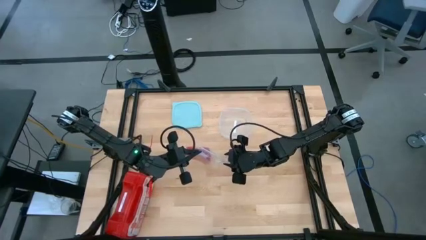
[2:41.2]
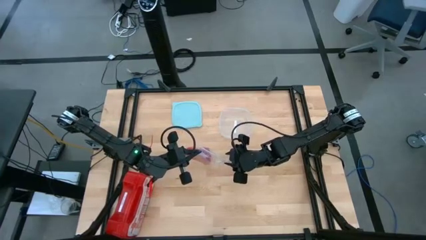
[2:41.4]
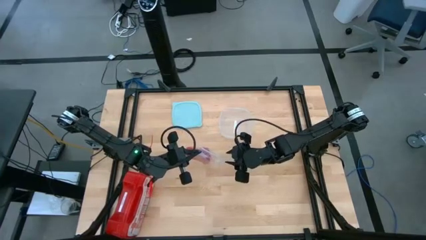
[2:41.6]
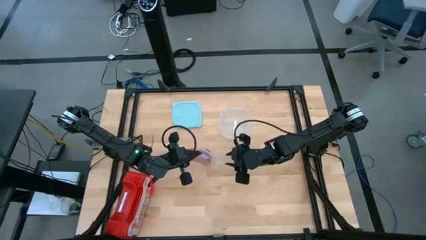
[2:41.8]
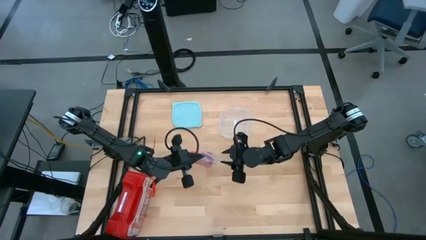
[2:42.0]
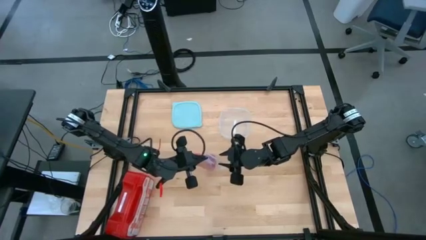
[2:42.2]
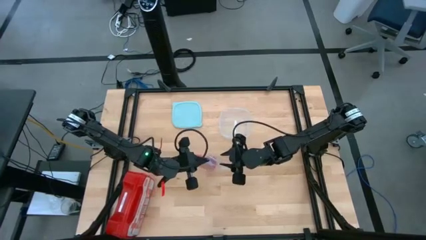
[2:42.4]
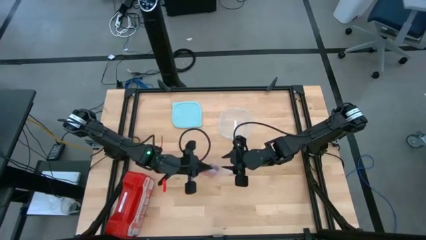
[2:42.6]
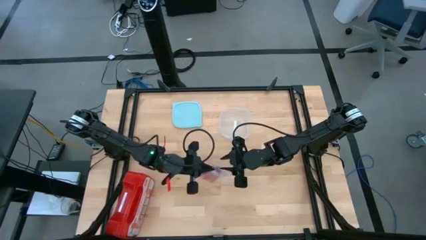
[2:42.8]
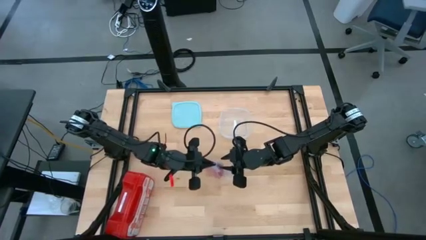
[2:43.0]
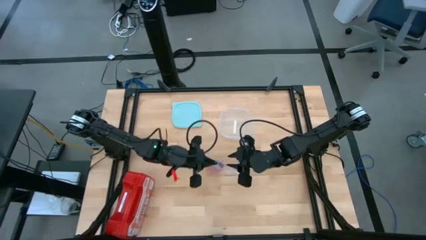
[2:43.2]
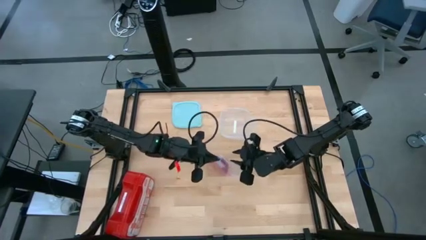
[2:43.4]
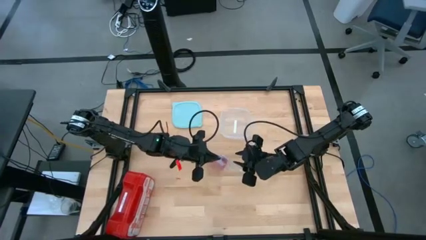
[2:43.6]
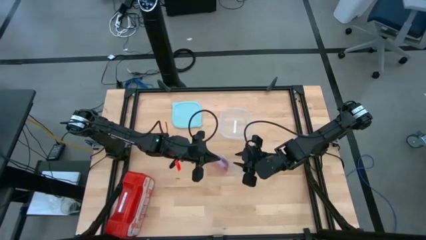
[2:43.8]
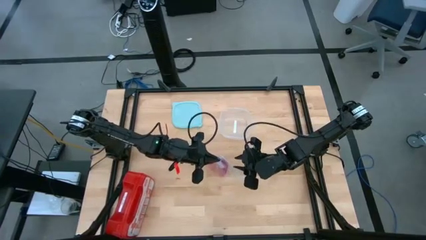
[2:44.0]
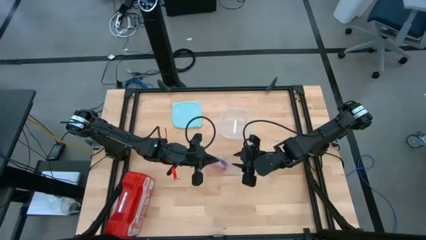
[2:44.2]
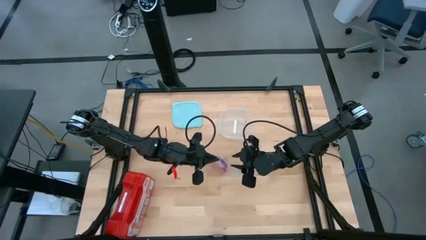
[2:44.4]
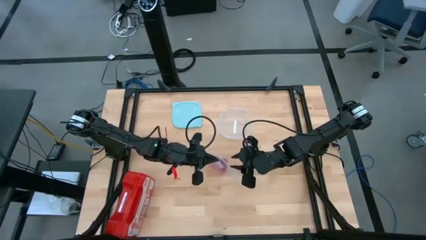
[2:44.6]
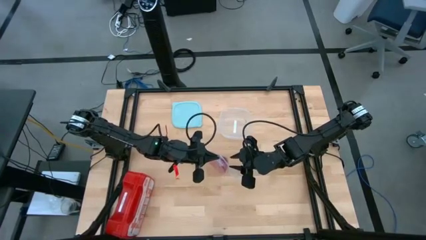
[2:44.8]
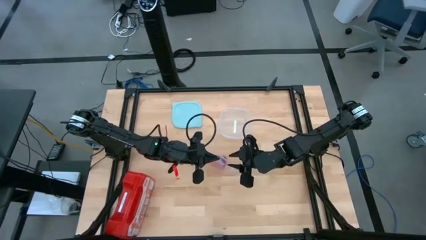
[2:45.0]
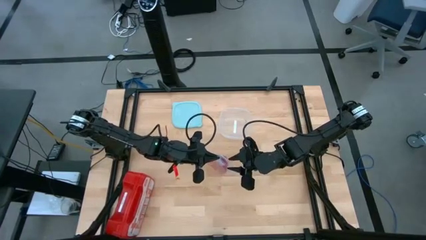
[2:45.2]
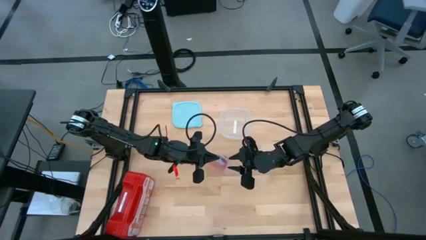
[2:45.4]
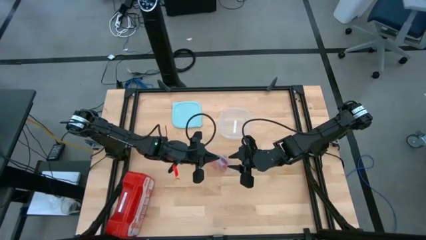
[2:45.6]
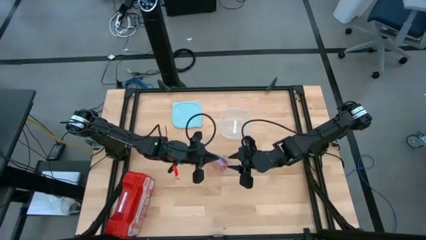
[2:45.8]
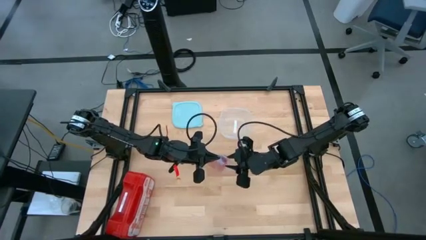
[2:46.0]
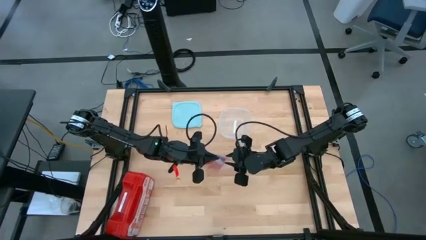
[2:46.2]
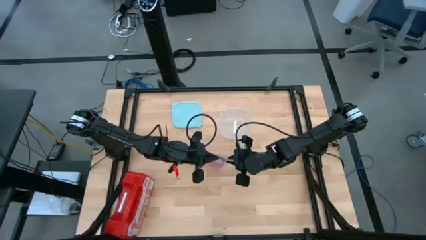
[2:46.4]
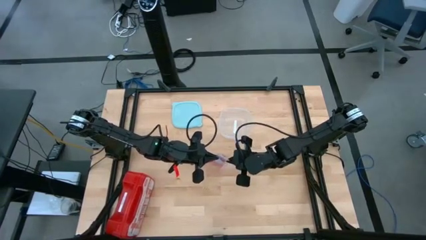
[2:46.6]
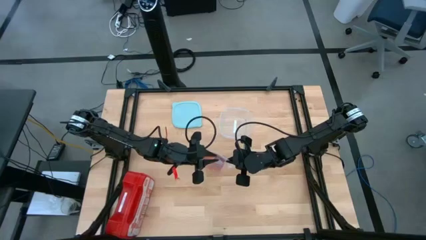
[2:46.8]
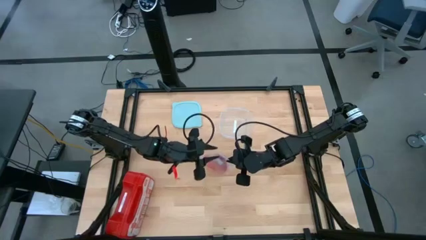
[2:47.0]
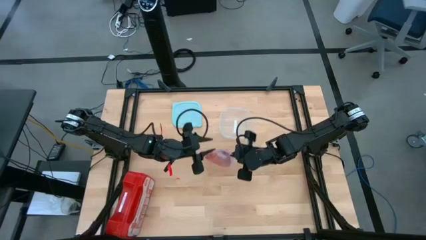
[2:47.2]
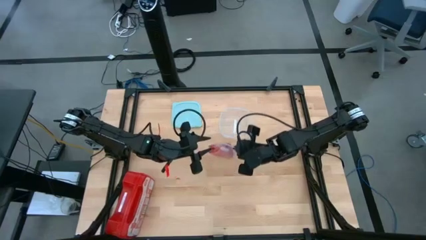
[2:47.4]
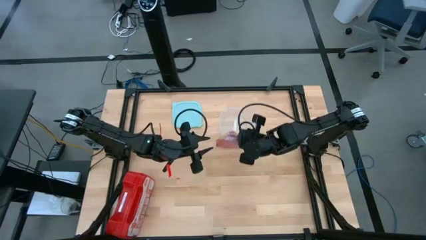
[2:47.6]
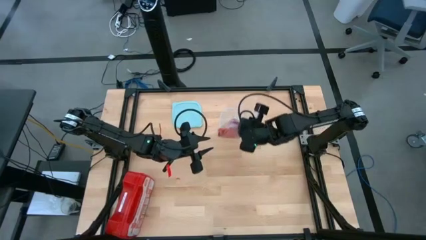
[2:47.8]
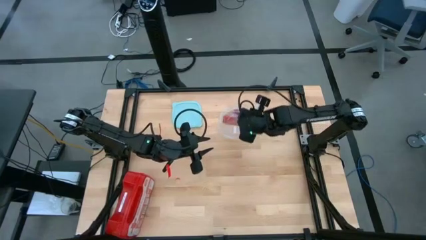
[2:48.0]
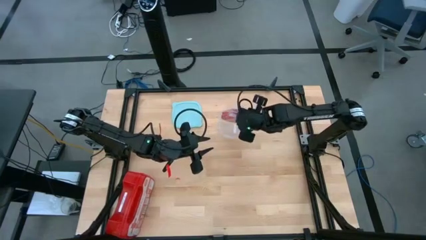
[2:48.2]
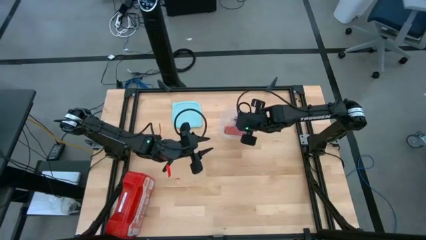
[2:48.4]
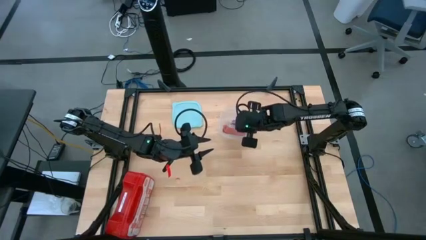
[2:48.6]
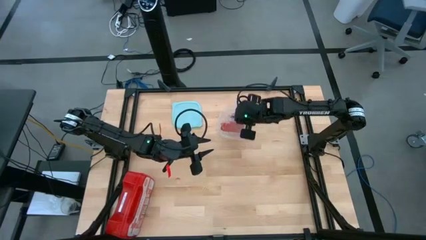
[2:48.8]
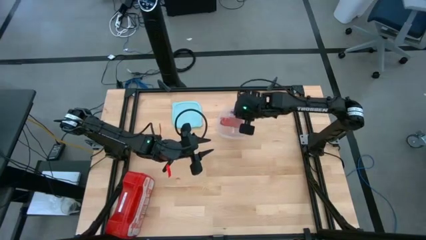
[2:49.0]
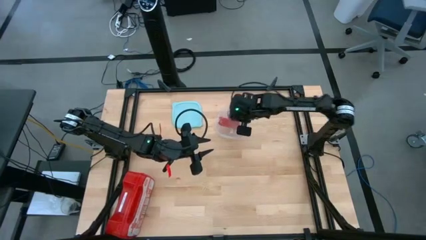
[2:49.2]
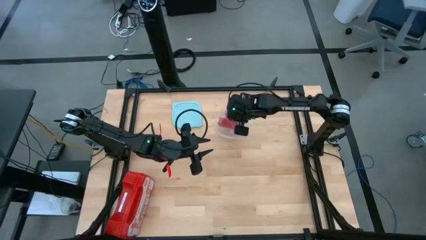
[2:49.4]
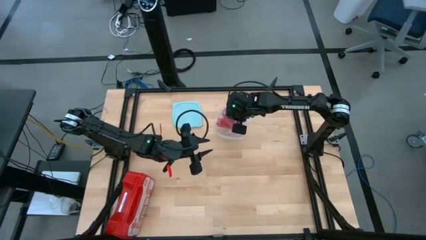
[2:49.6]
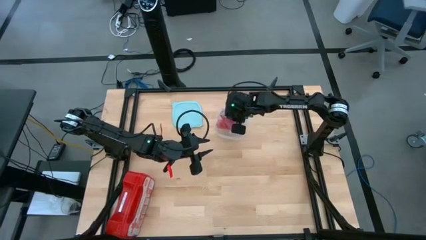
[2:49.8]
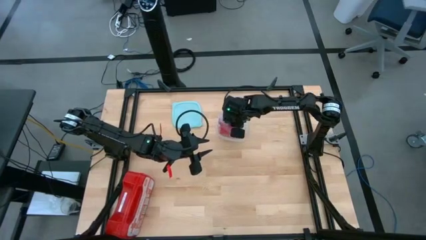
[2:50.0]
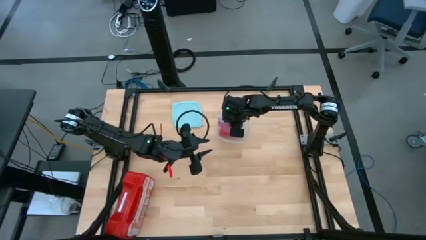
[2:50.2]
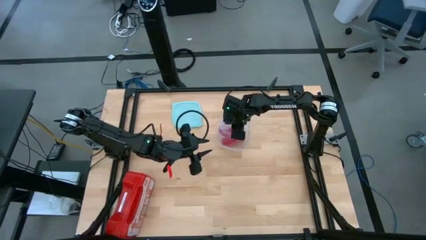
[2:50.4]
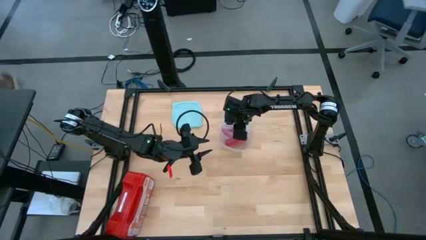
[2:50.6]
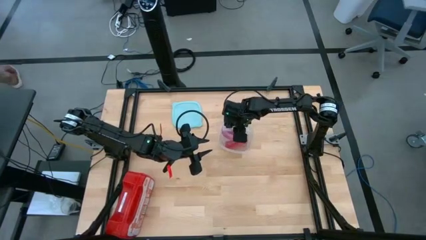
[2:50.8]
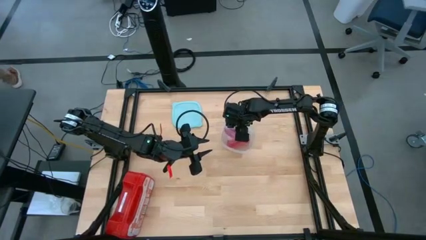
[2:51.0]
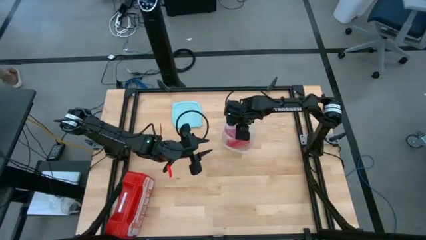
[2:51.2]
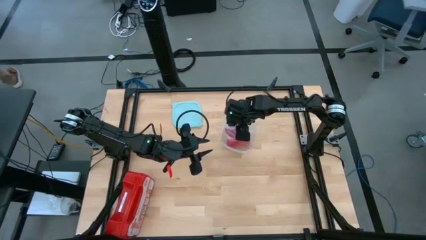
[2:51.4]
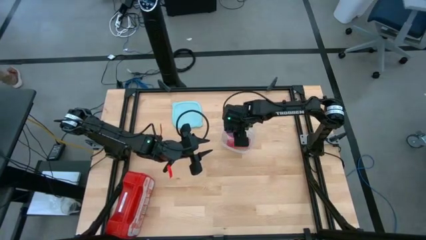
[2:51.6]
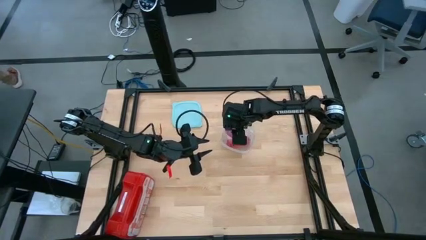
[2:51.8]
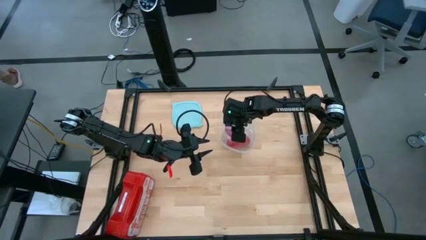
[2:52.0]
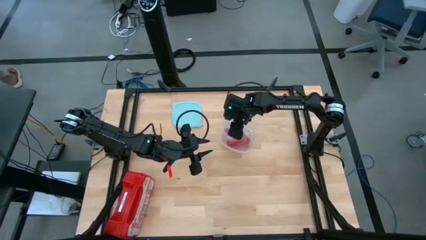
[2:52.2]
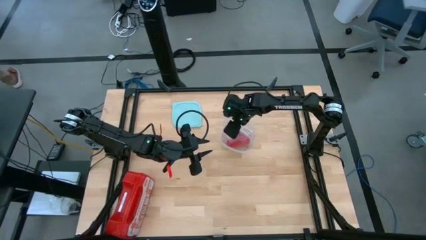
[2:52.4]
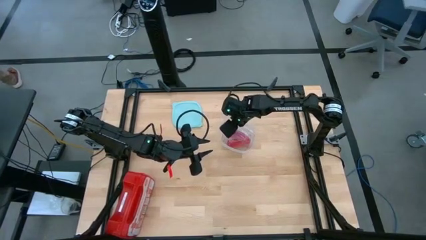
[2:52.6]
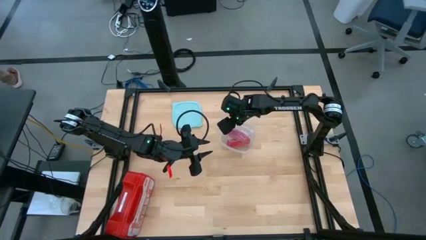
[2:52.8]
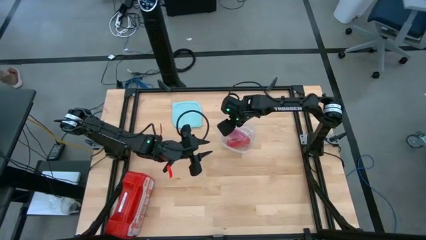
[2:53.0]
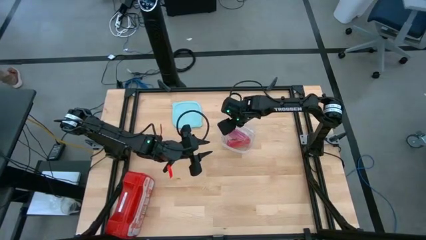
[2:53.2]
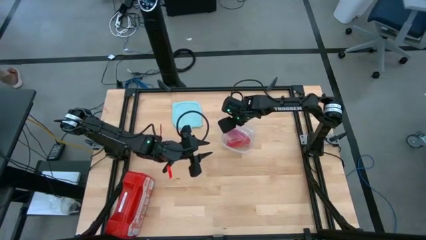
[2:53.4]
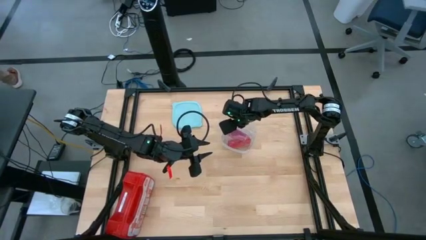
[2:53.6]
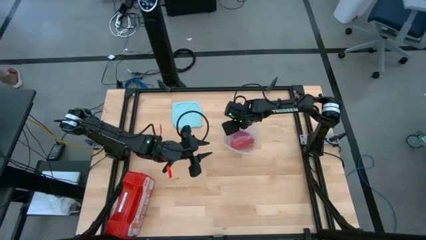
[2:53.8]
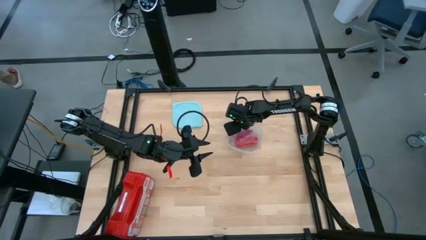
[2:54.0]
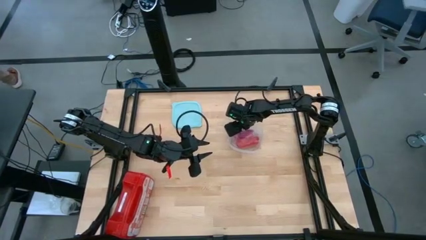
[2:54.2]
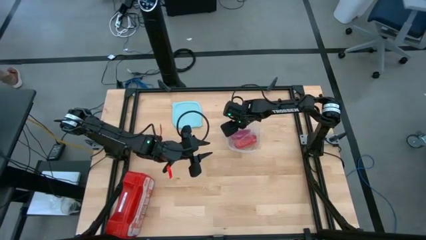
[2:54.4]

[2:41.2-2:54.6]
Task: Roll bandage
Put the transparent zip bag into the green tupperware
